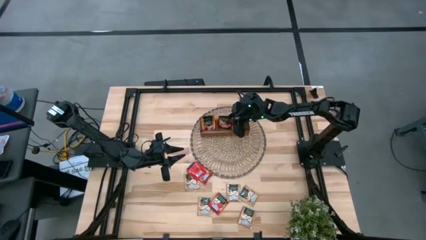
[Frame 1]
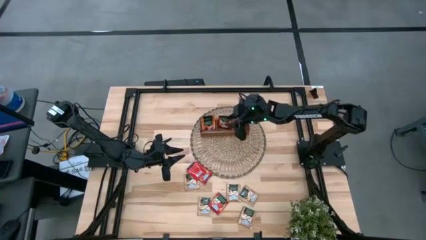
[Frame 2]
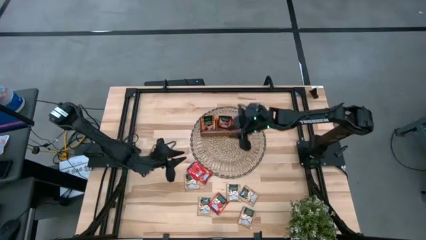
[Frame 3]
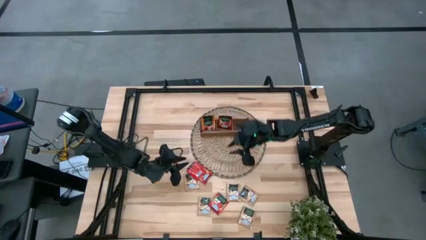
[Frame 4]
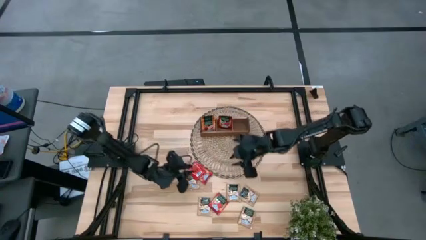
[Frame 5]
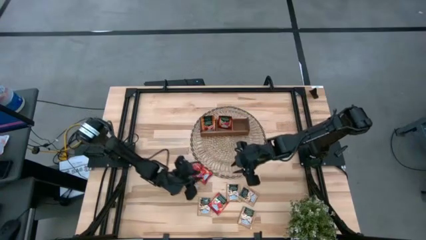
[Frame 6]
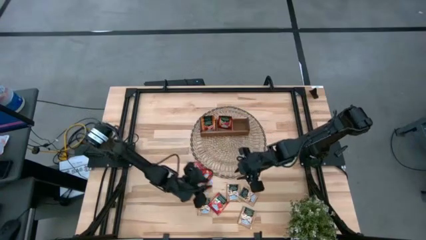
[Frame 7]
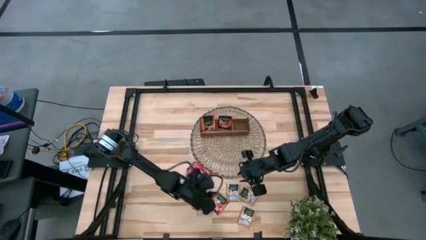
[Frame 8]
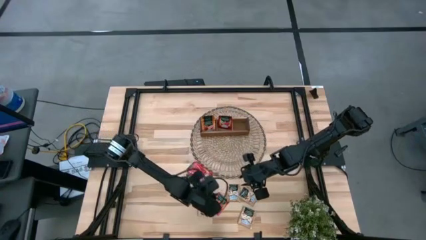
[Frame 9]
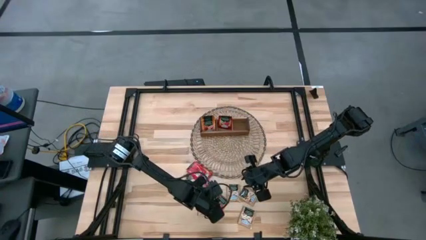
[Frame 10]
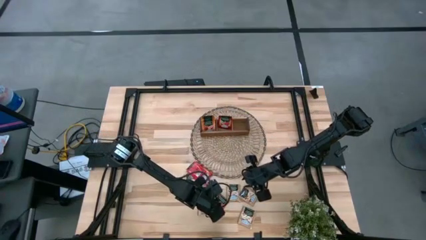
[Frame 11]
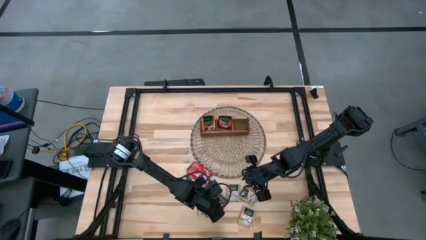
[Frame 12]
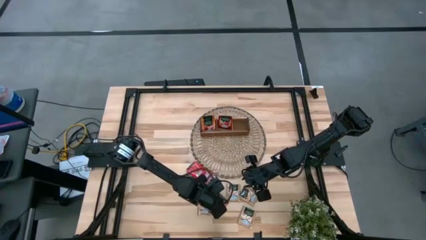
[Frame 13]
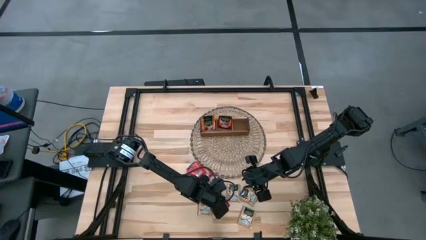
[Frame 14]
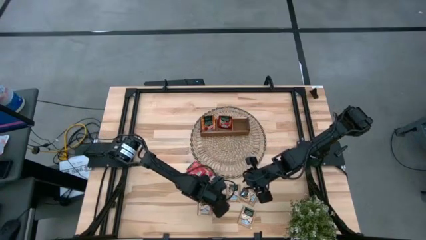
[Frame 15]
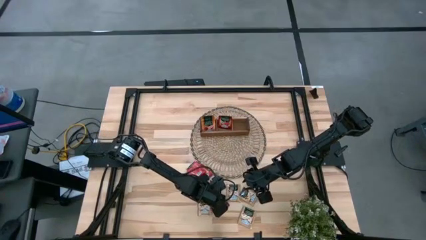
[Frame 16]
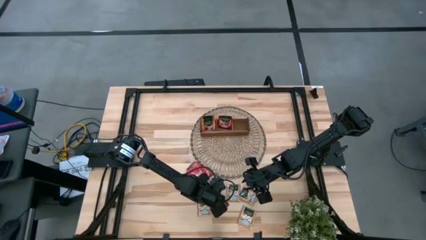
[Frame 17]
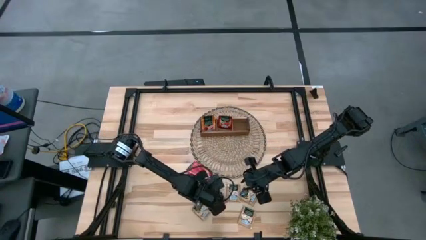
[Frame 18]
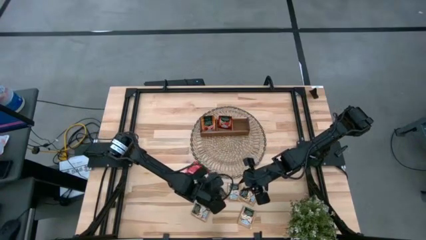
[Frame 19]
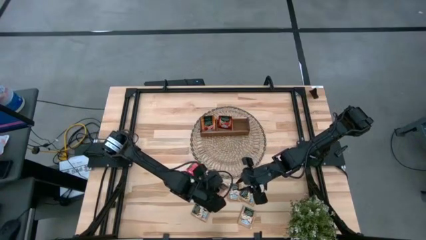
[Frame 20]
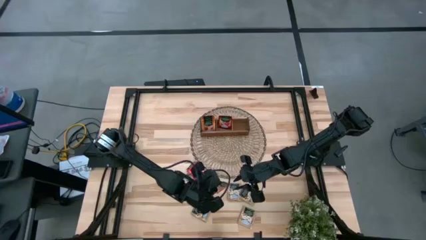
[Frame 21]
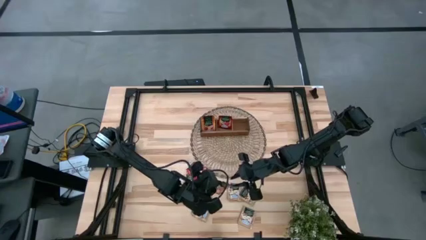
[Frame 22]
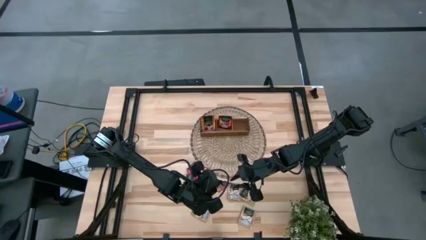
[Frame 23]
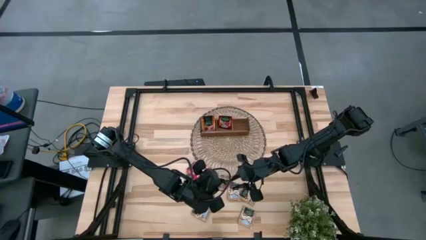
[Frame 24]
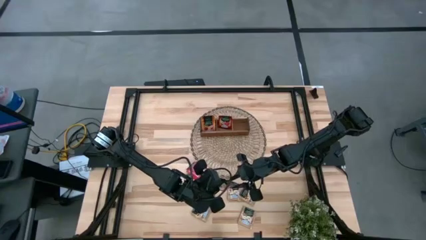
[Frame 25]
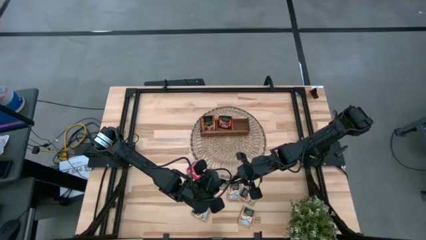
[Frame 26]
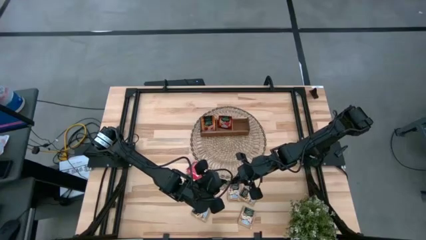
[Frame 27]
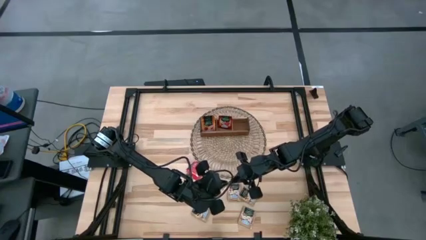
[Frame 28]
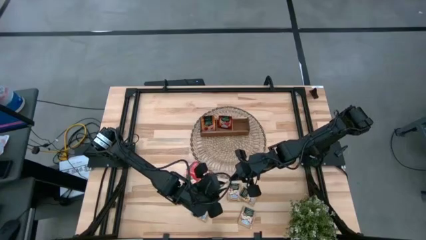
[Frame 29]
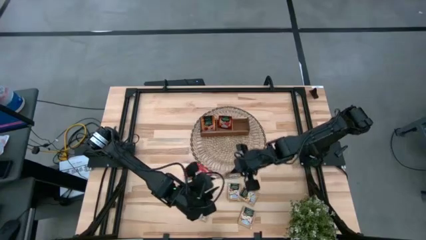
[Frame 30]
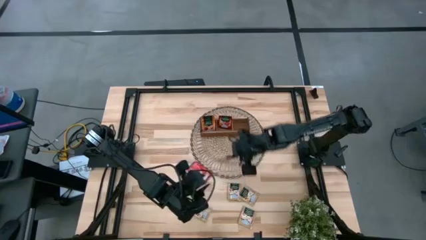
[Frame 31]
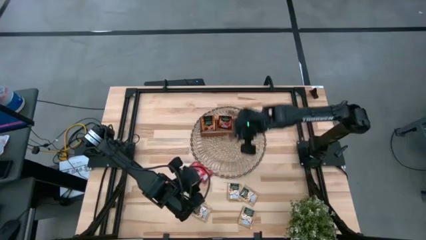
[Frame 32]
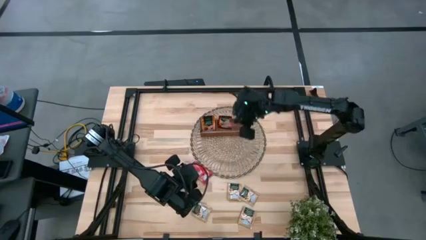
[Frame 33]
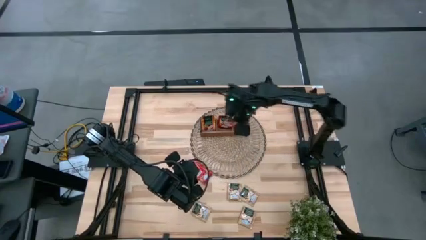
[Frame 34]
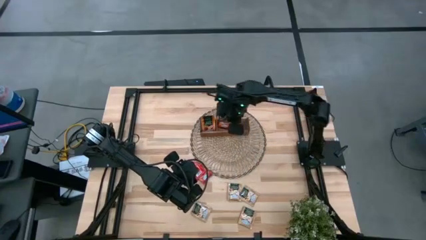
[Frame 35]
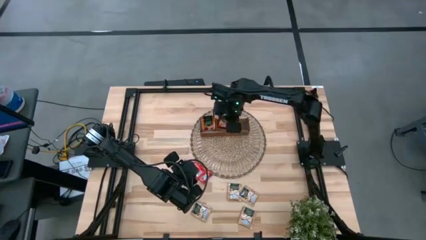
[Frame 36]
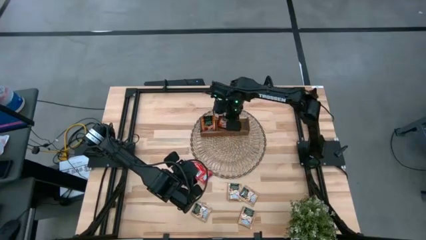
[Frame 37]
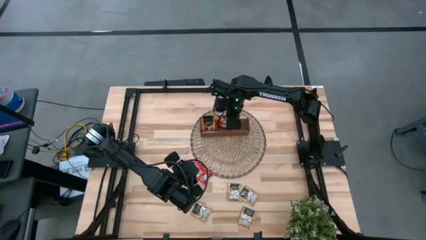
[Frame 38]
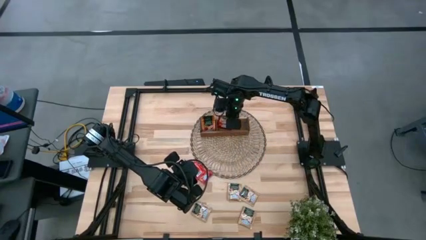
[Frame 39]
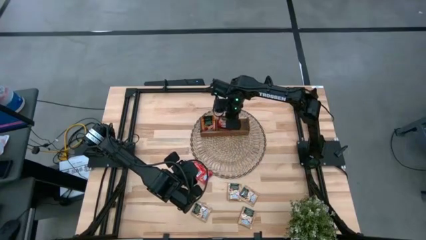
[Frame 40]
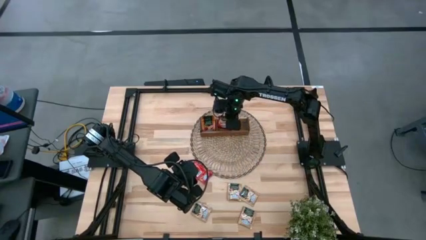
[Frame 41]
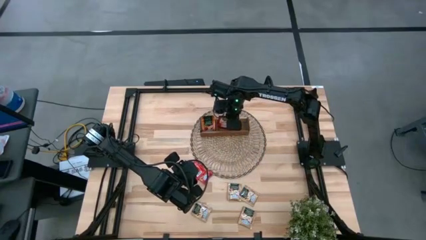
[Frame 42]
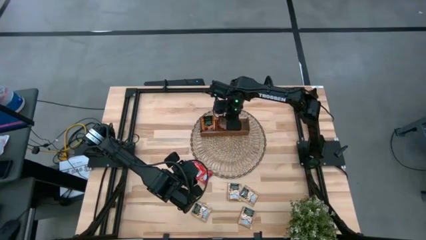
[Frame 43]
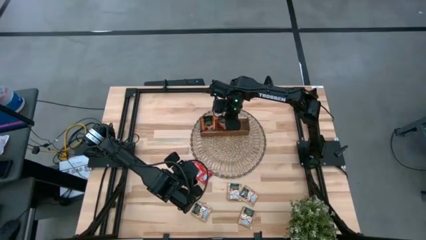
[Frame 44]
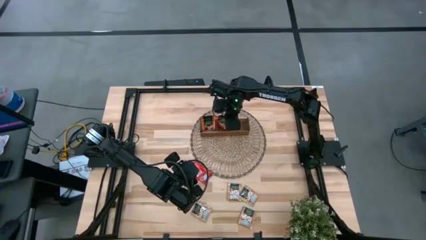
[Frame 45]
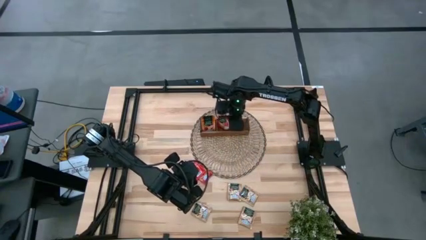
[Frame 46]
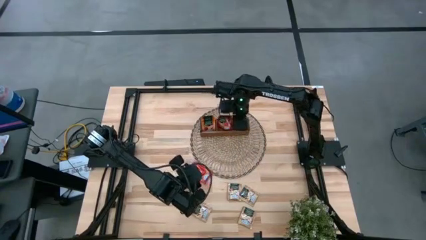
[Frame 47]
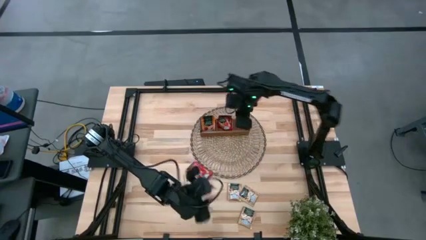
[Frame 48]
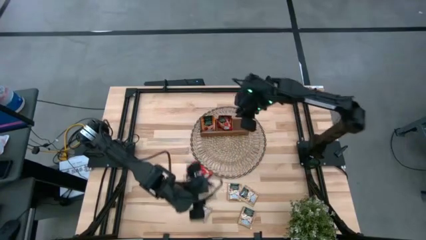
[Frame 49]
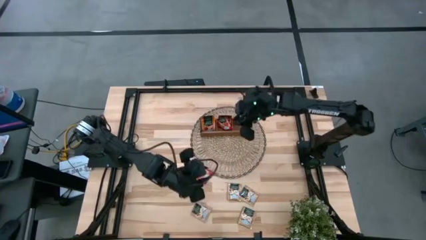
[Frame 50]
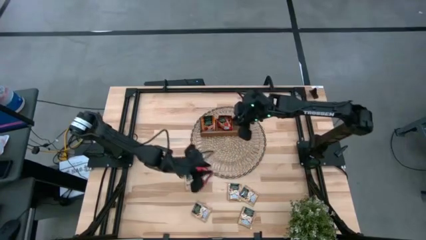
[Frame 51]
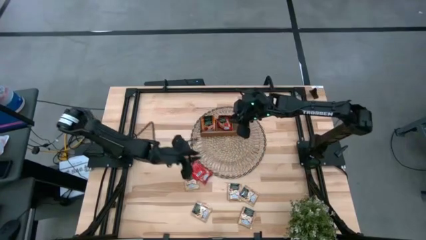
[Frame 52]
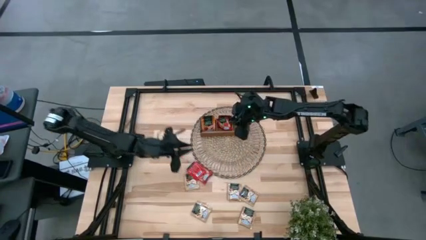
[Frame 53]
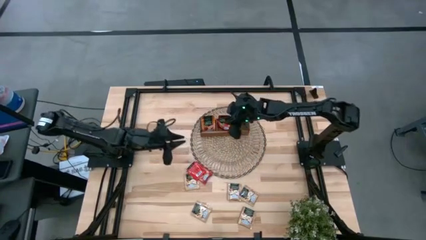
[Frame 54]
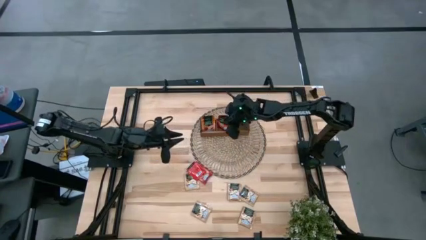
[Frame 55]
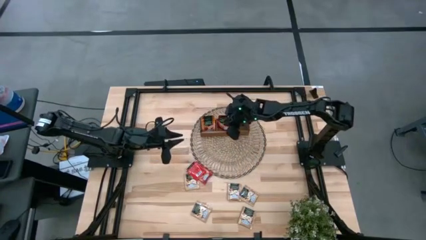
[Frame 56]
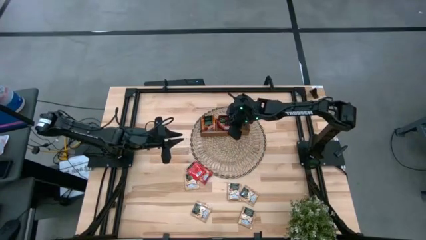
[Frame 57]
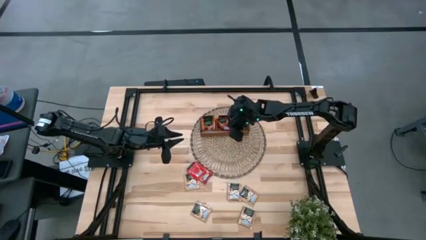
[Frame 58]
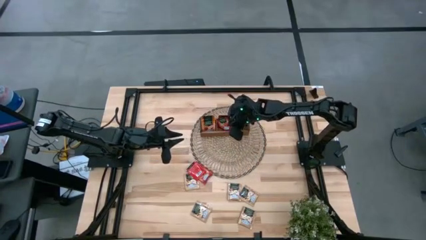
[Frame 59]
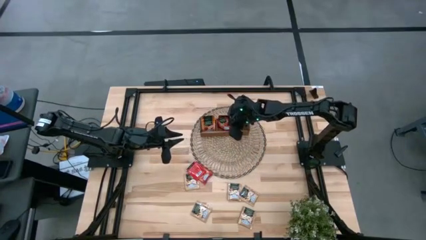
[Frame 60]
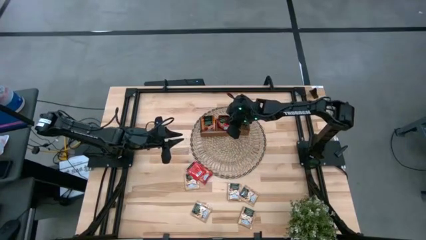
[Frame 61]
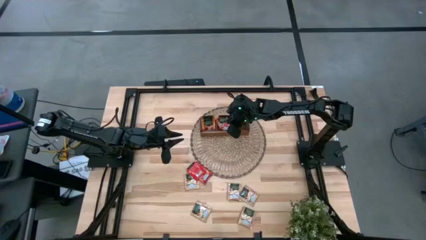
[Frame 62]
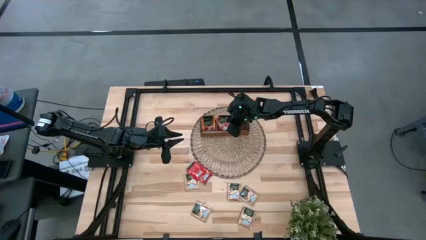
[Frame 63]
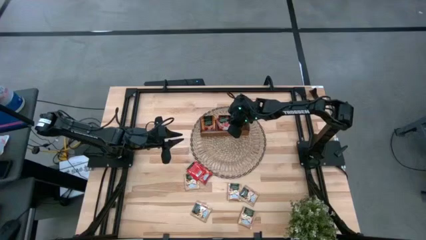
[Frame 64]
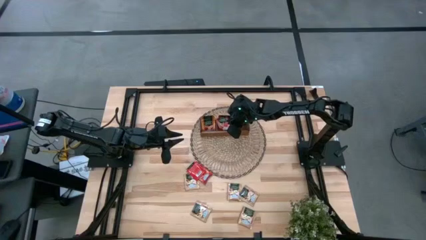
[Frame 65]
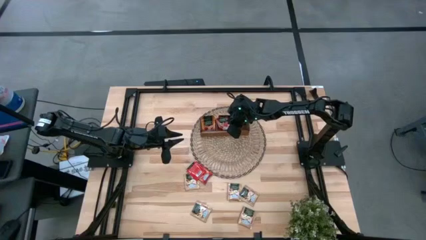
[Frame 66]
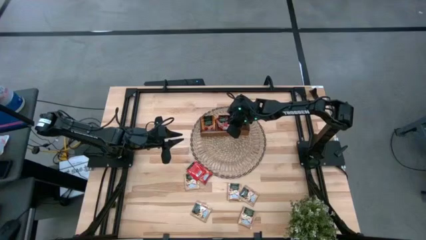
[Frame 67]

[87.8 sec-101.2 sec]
Task: Pick & Place Tea
Put the red tea bag into the middle section of the wooden organizer

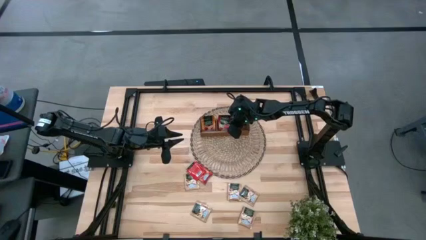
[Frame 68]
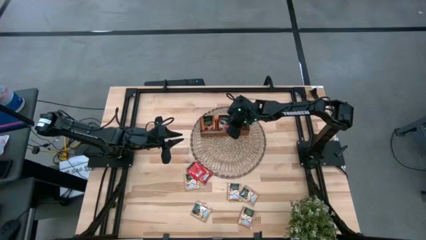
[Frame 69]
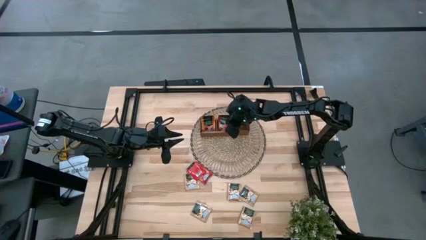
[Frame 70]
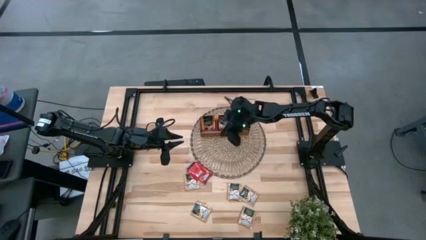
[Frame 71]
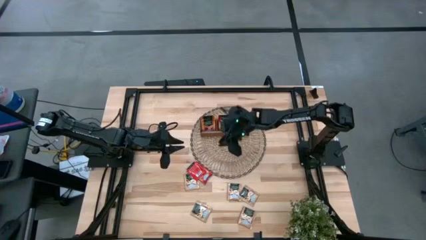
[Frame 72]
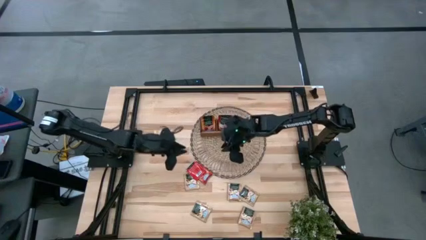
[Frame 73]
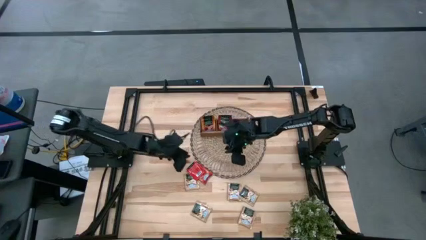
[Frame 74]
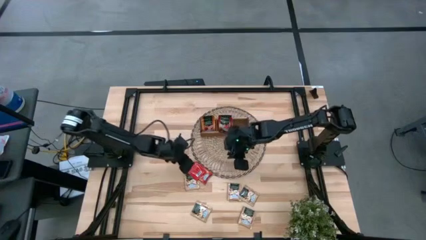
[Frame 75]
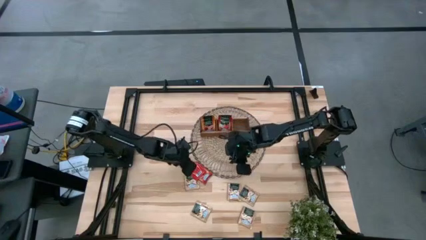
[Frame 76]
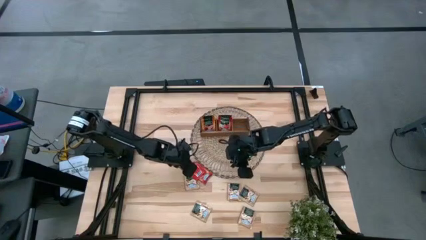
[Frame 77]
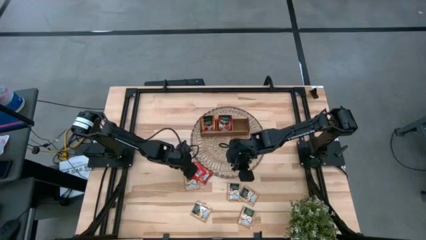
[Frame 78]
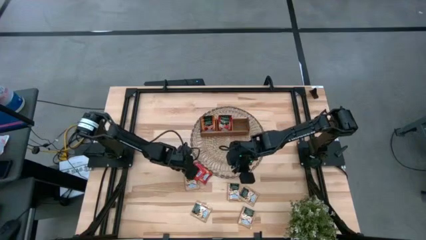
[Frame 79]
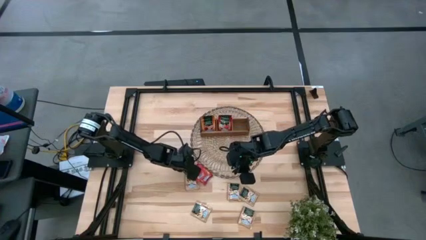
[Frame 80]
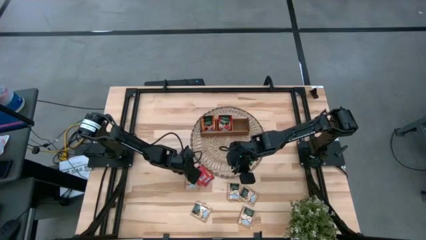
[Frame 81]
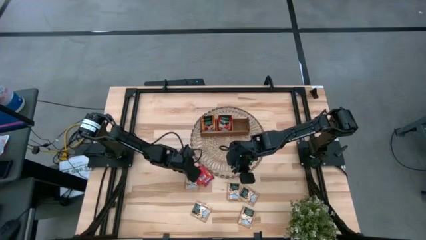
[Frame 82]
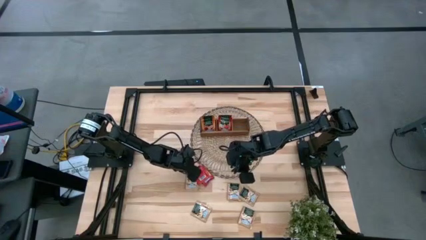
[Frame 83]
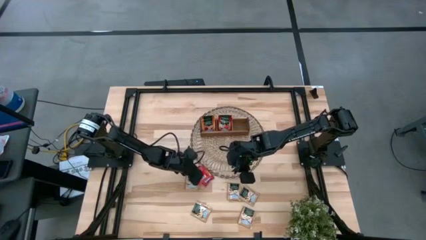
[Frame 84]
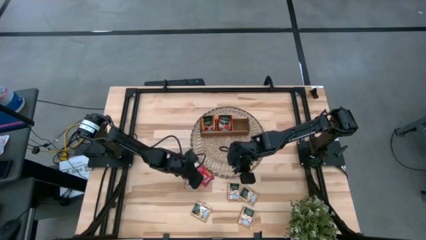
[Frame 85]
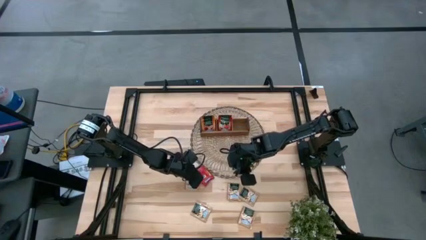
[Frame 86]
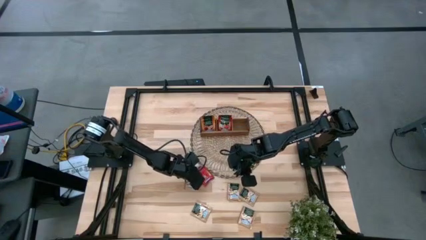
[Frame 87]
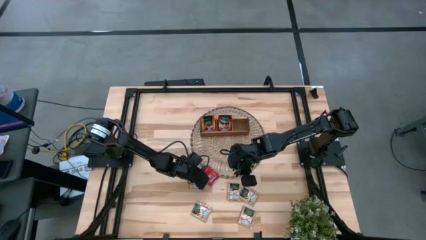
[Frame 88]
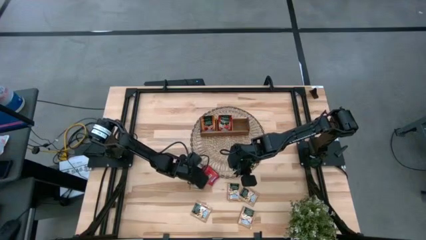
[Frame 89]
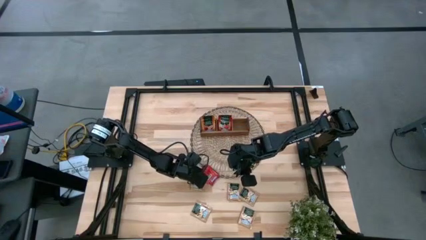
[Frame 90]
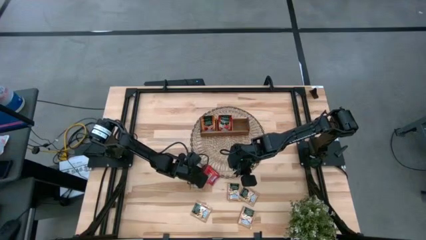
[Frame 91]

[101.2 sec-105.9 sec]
Put the red tea bag into the middle section of the wooden organizer
